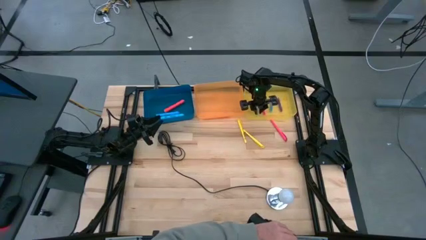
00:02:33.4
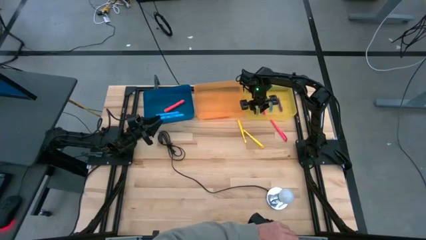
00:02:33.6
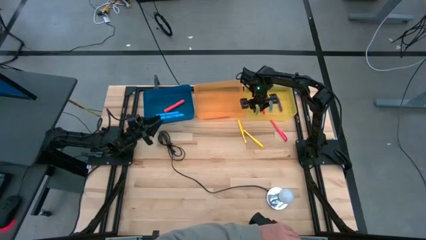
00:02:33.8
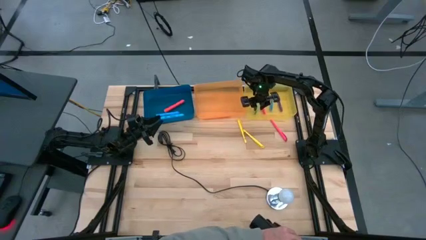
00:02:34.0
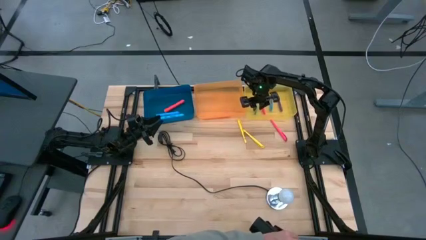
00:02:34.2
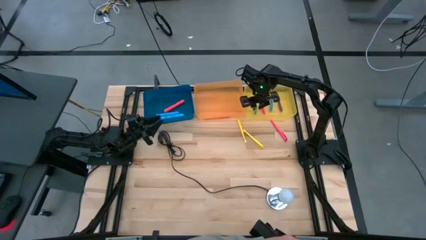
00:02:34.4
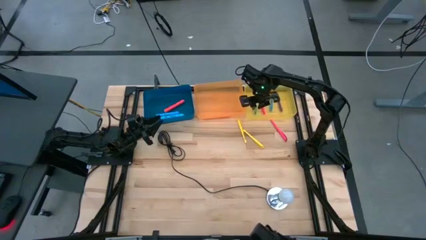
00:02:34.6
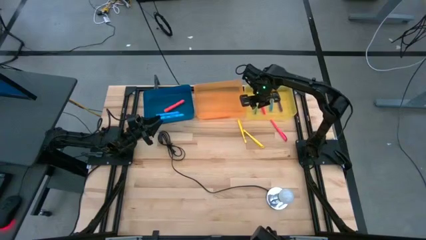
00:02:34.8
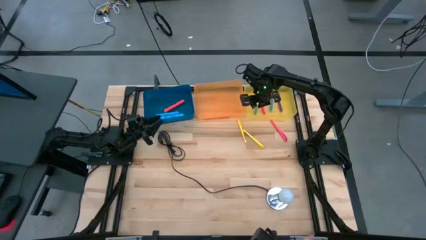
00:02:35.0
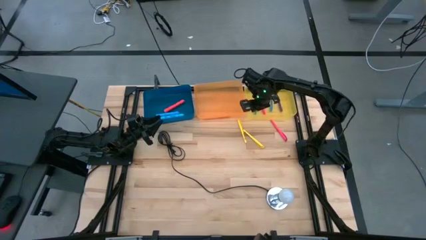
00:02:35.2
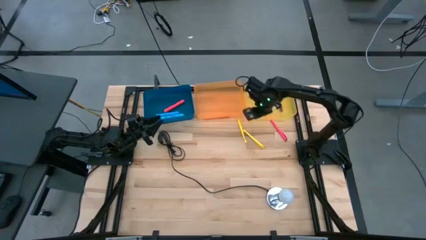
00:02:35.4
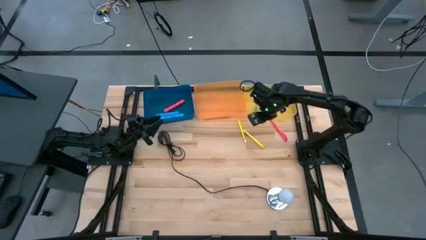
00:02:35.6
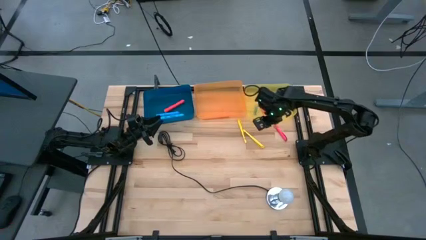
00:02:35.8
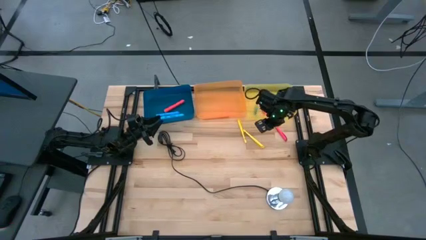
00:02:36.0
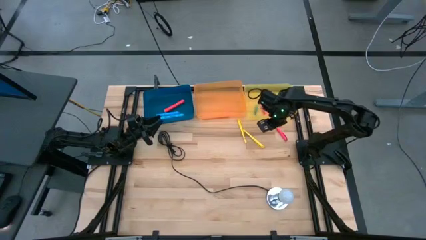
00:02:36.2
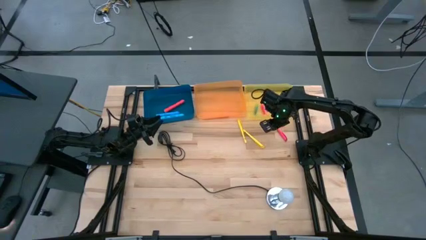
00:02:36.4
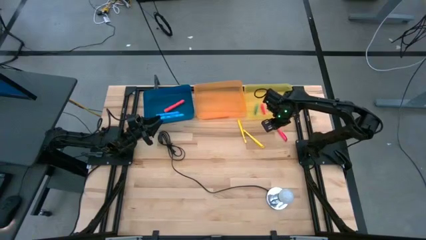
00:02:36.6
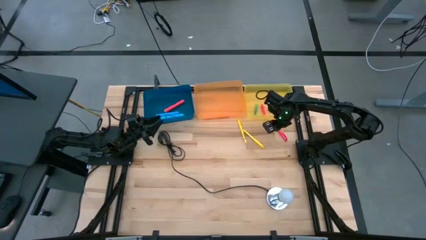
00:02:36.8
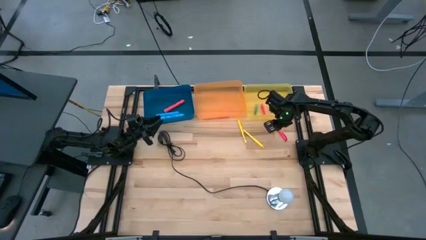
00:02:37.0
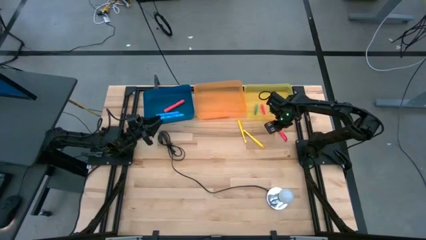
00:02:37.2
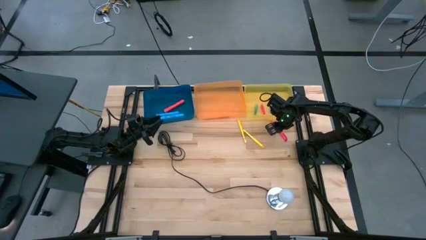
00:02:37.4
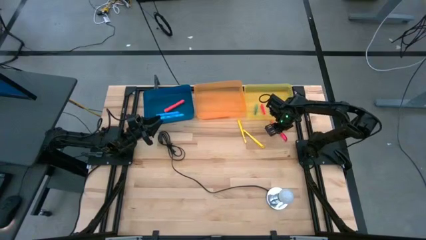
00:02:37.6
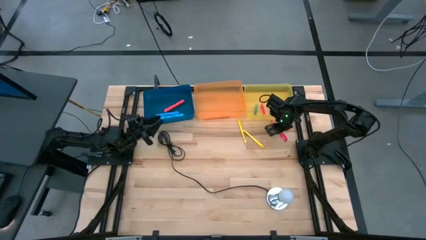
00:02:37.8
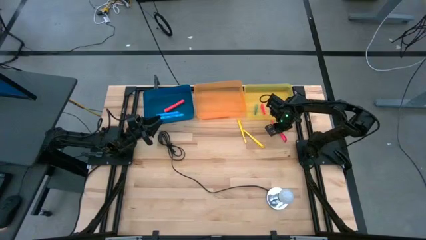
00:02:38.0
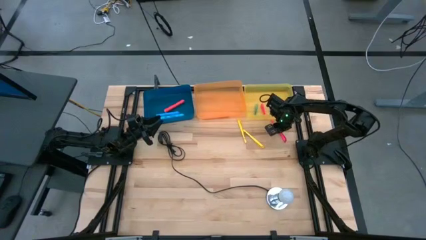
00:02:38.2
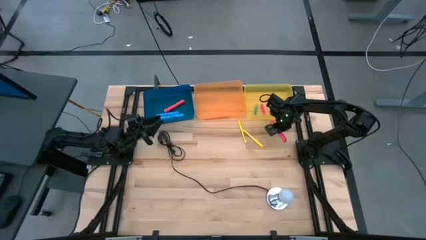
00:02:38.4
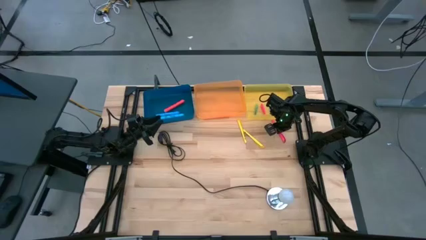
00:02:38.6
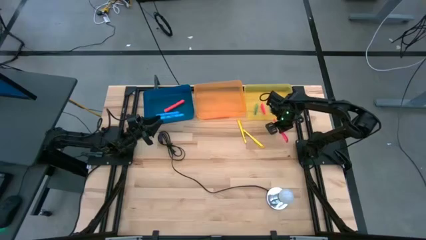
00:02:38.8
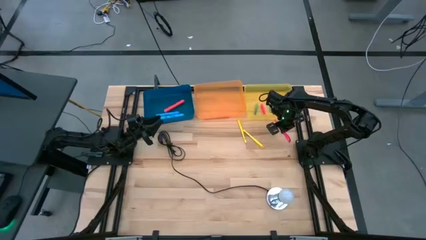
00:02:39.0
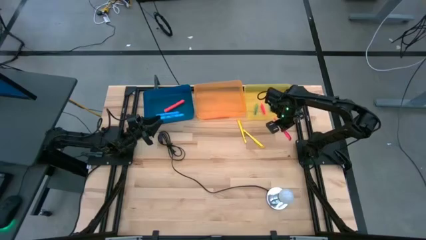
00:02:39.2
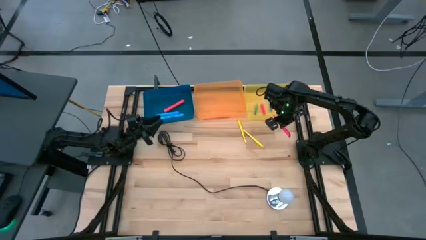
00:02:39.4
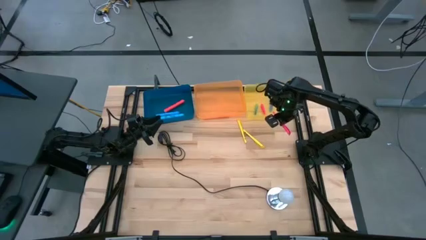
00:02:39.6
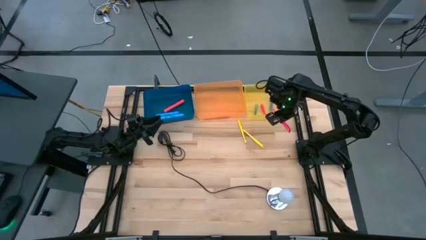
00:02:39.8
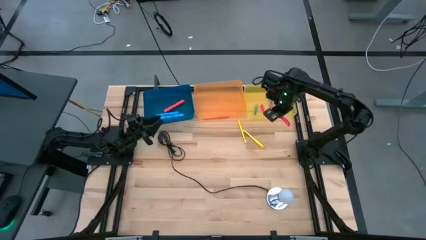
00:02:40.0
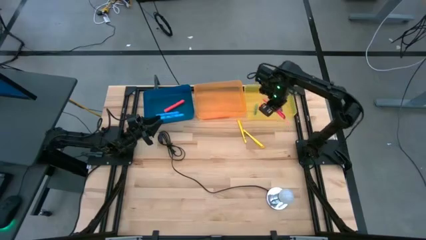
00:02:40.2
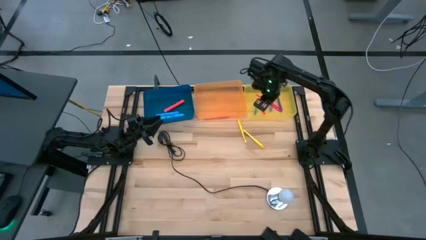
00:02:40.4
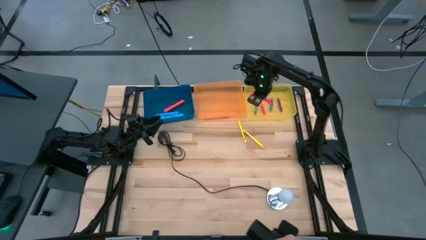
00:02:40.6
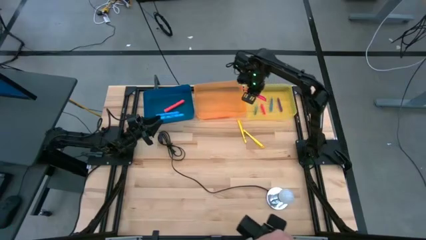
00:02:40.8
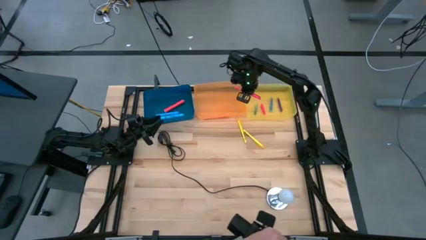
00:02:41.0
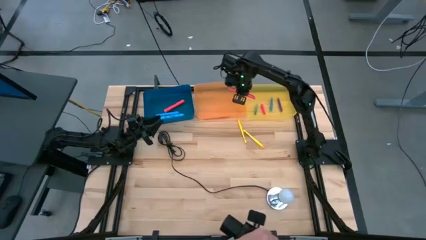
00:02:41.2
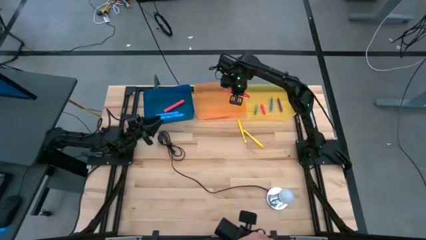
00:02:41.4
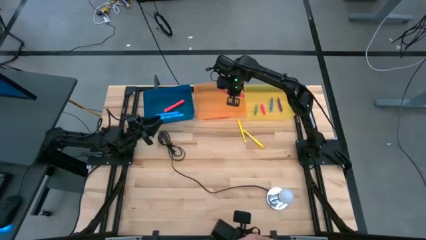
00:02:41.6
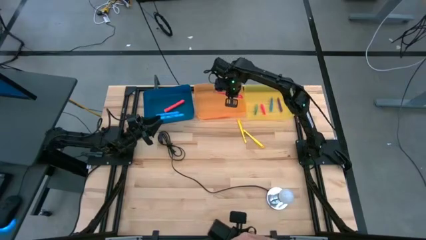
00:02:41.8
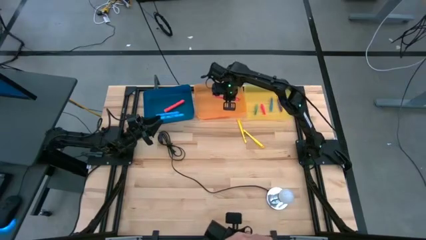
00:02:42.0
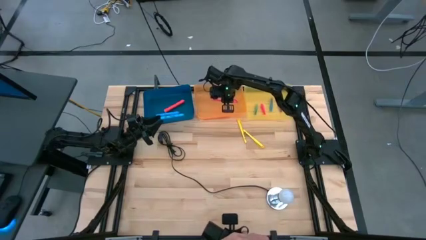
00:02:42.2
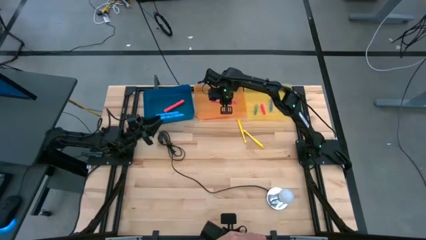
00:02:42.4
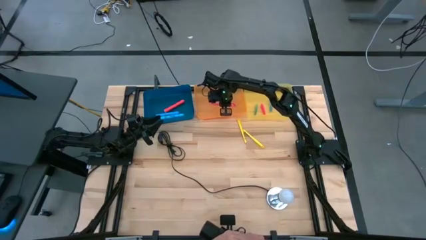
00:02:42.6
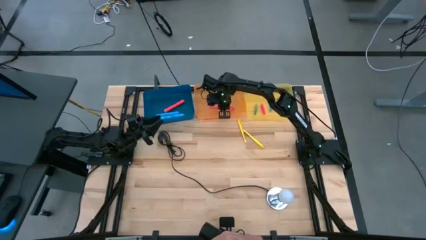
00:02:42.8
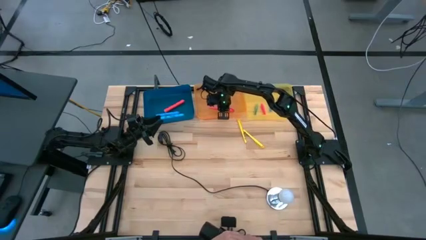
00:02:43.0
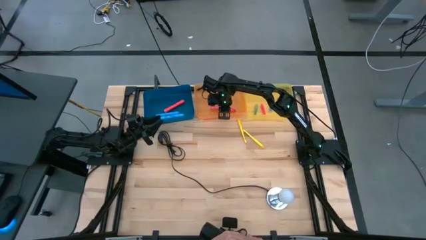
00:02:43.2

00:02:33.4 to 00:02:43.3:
Task: Pick & Place Markers
Put the large pink pen into the orange bin

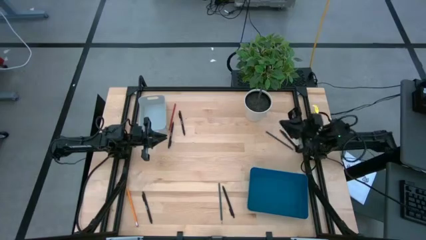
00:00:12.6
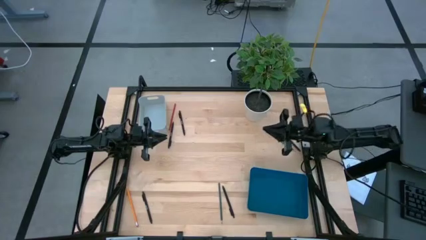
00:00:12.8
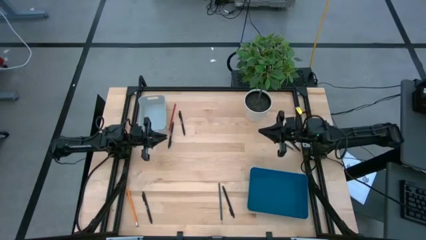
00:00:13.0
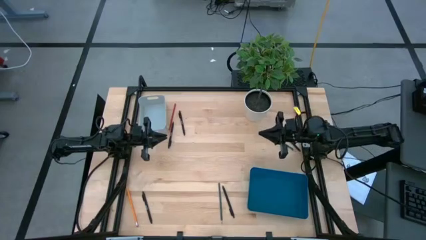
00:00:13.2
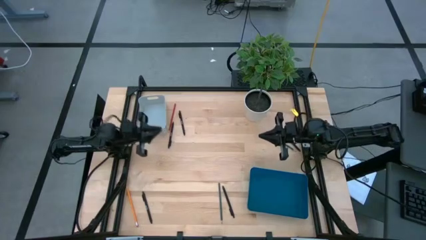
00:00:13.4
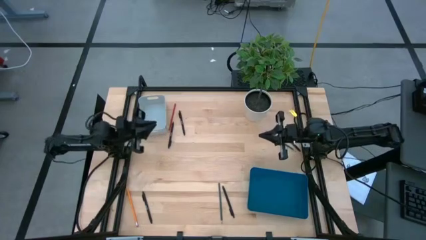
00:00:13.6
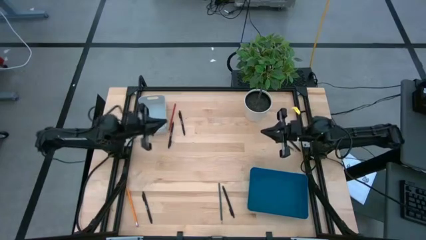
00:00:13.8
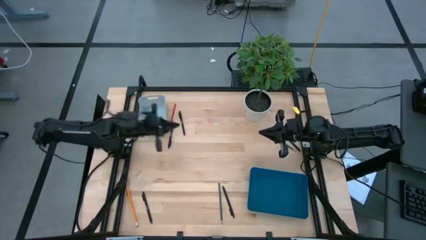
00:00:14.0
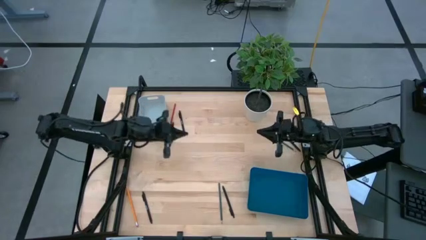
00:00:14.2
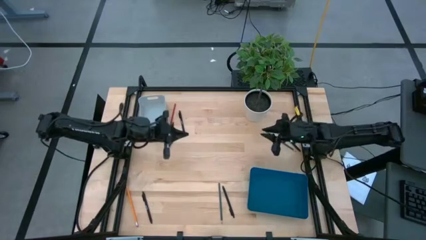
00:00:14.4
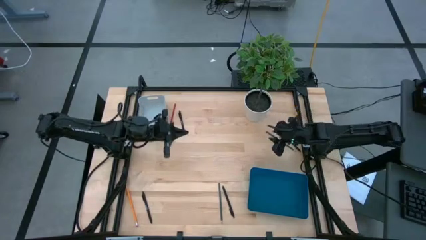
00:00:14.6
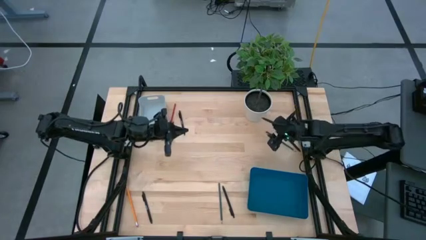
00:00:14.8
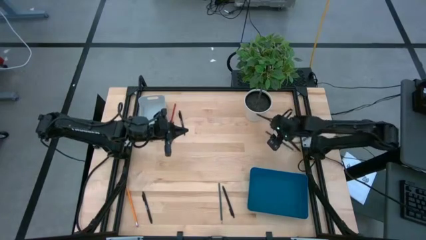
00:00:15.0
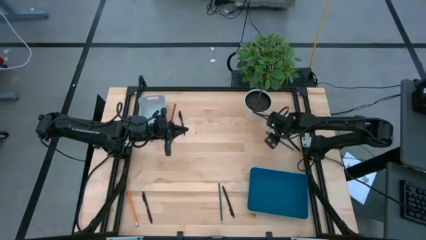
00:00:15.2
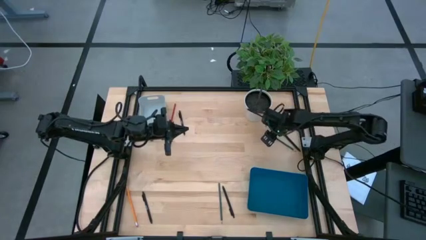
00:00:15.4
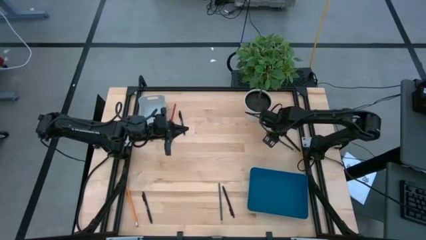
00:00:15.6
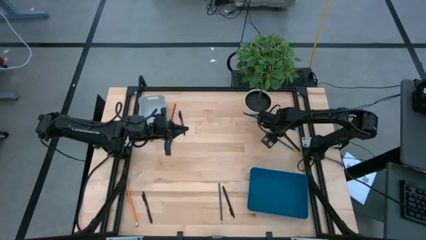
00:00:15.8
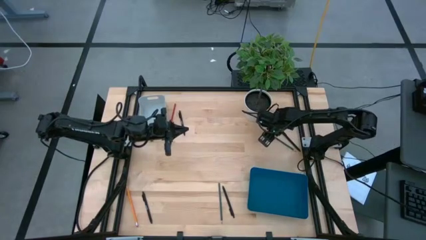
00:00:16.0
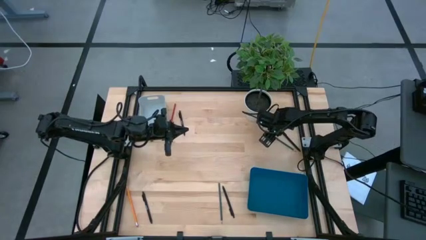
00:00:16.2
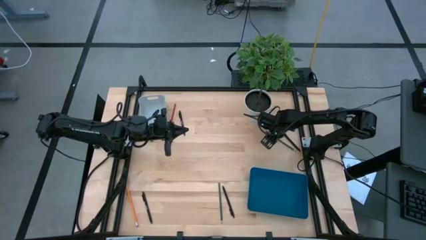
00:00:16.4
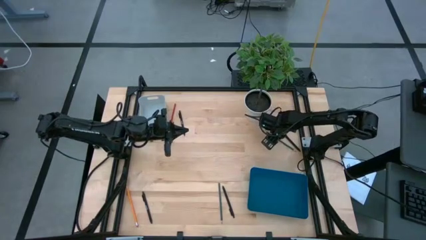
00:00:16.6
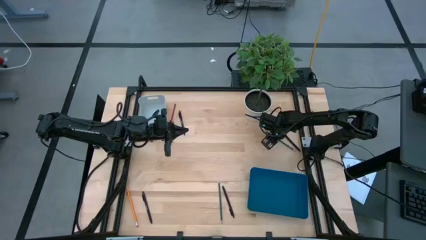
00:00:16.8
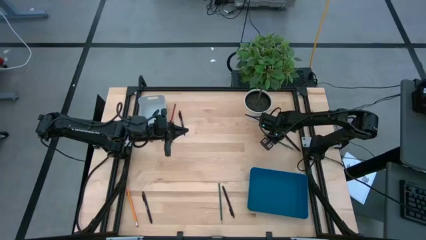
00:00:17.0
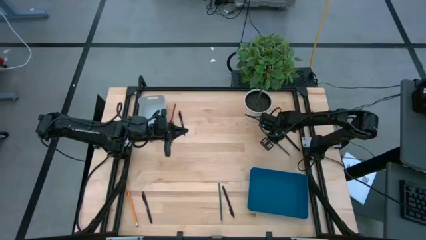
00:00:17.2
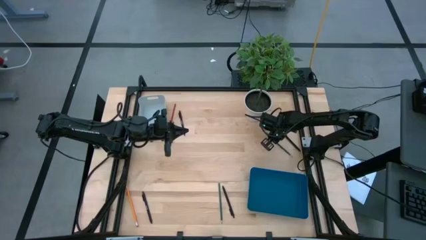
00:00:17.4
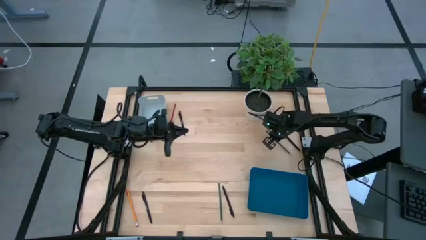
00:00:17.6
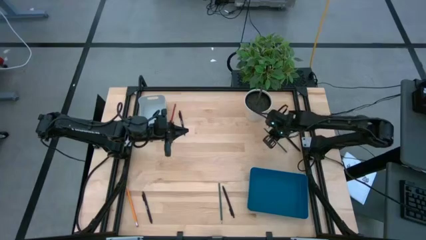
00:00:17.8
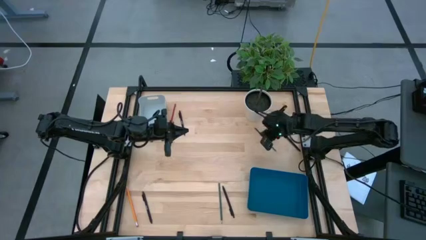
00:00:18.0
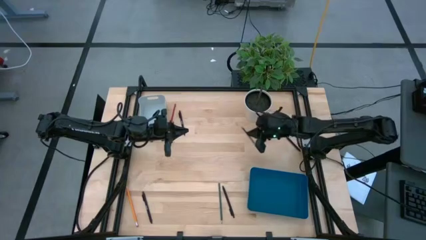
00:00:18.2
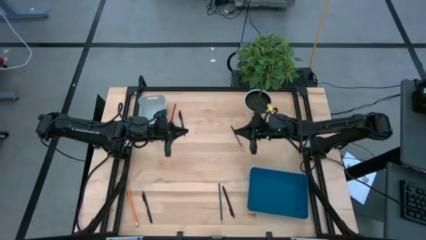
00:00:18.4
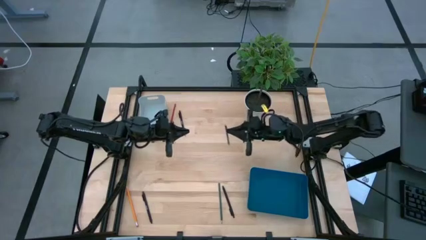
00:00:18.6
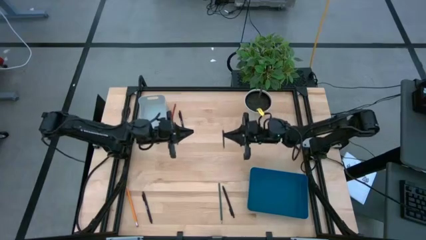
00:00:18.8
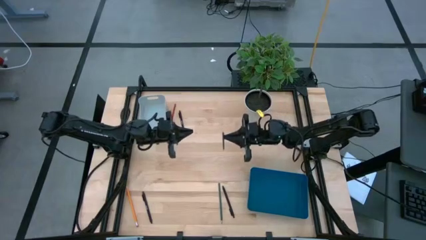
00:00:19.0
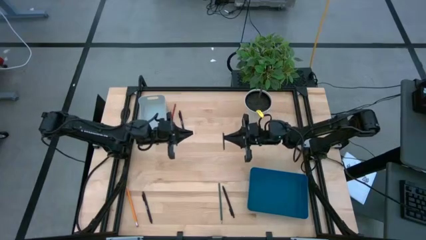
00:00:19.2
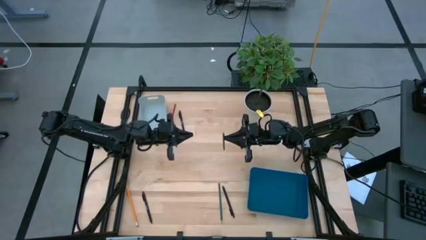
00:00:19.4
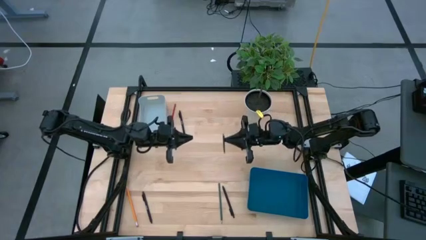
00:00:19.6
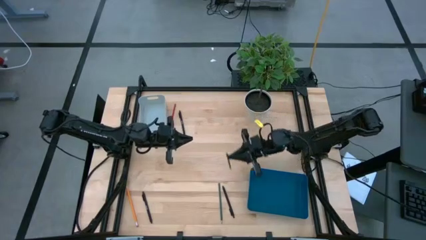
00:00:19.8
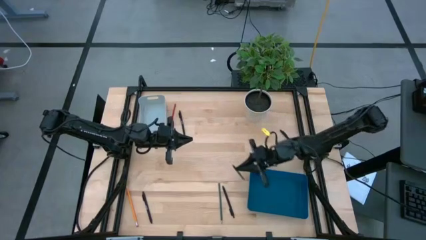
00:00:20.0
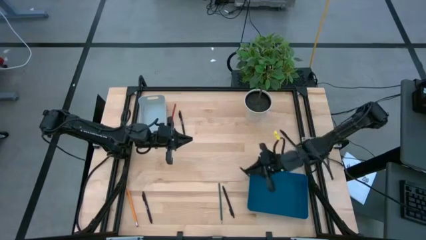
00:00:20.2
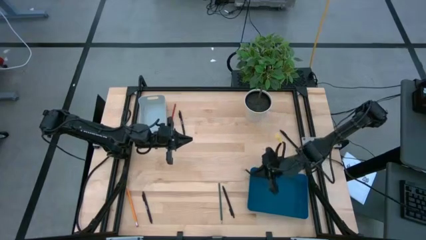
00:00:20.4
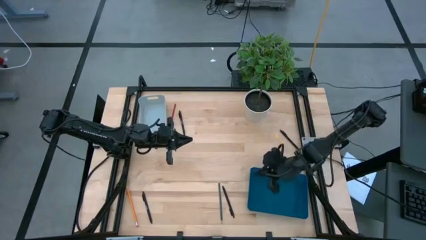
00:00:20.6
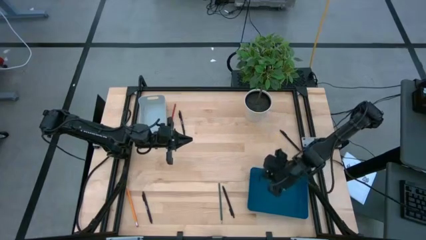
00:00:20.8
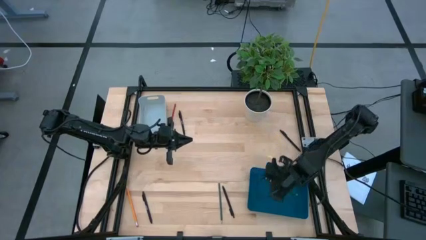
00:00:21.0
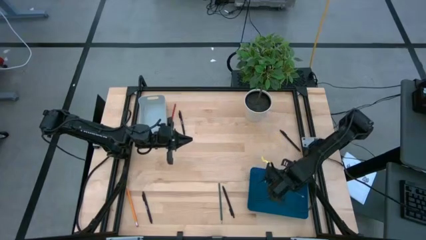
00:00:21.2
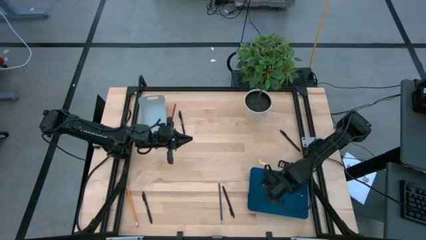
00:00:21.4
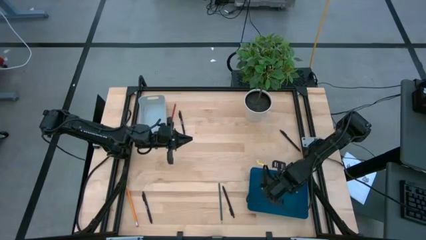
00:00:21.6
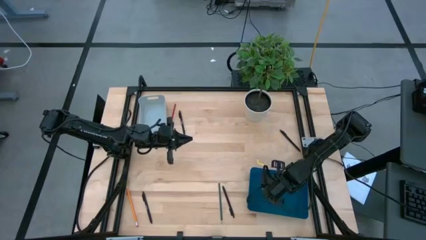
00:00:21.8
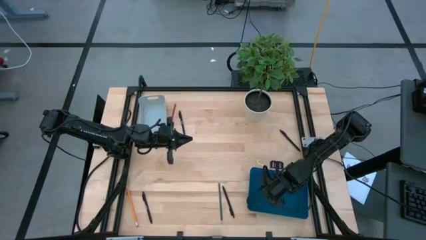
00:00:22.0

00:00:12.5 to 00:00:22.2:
Task: Sort pens & pencils
Put the top green pencil into the blue bin
